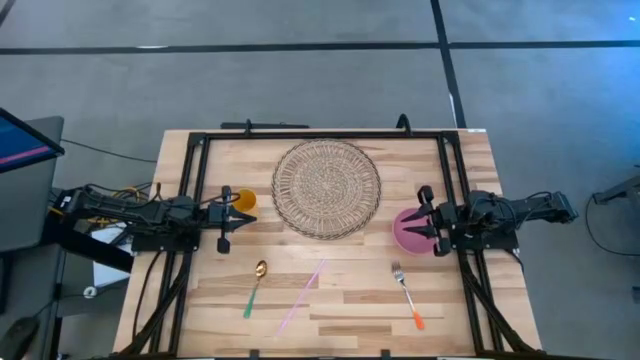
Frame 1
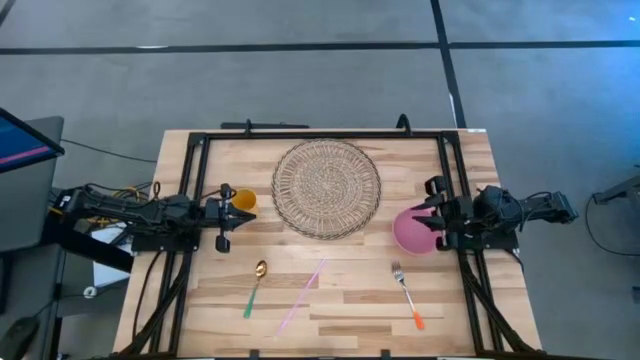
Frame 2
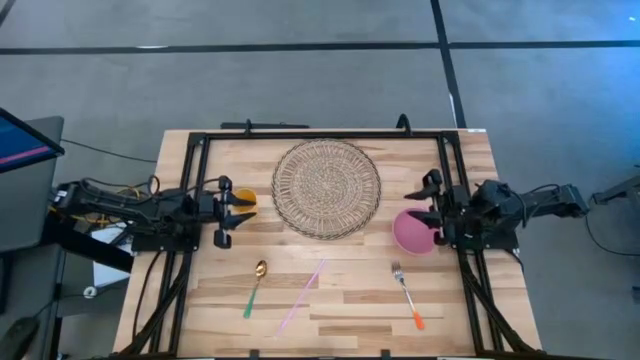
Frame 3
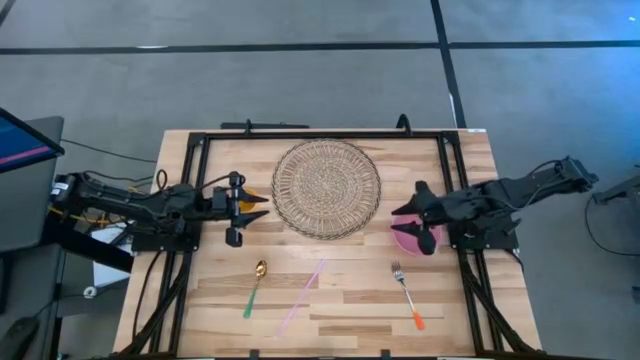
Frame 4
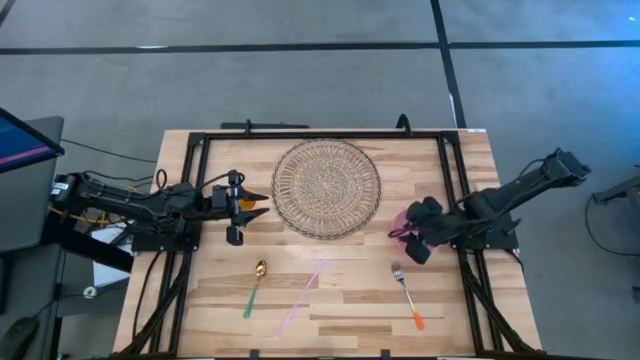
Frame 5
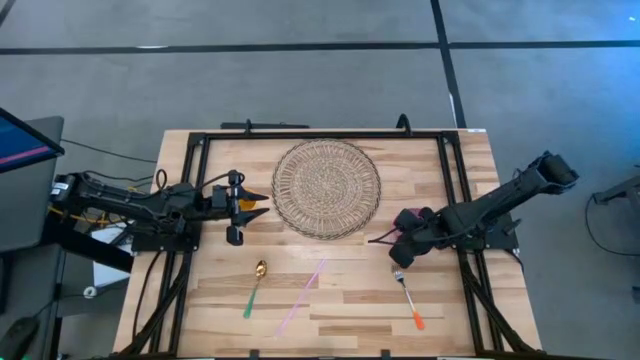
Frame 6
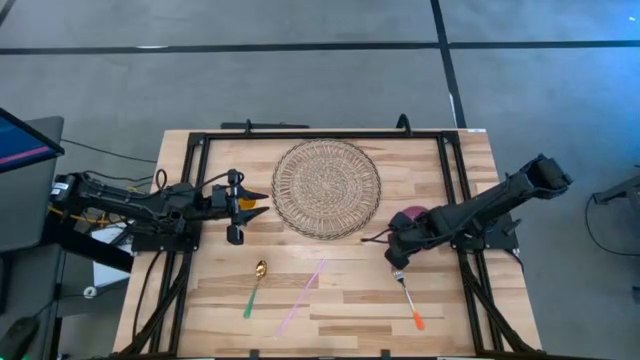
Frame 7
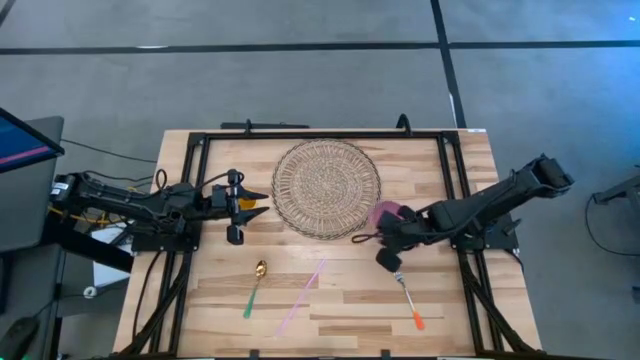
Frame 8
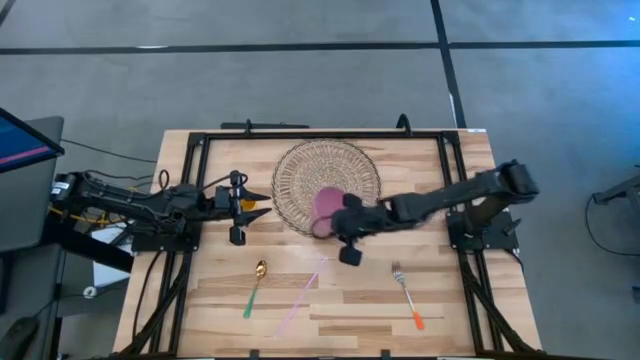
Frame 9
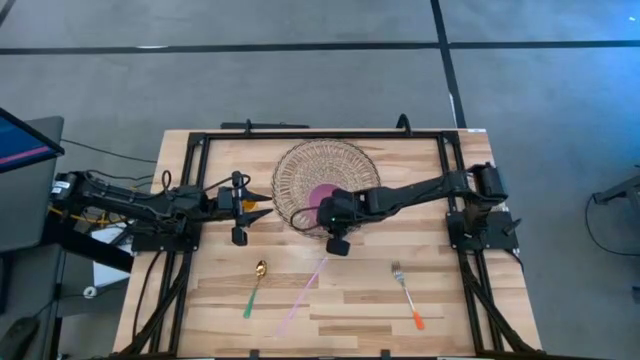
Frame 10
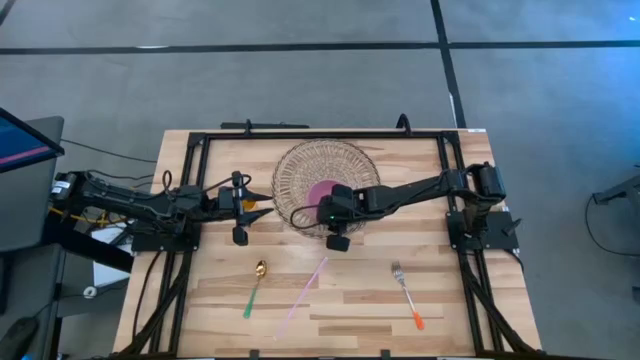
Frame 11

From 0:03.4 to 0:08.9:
Task: Pick & Place Utensil
Put the pink bowl on the brown table mat

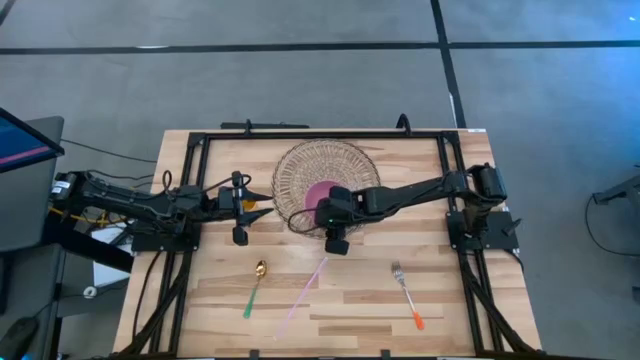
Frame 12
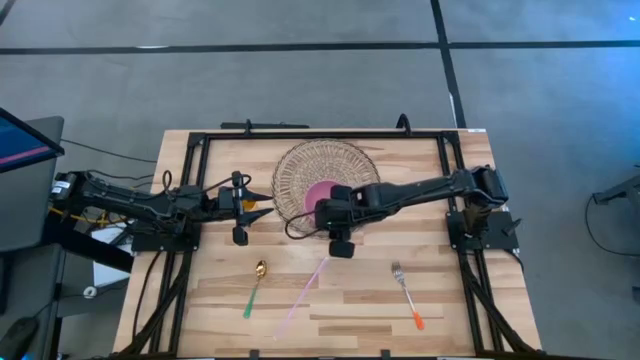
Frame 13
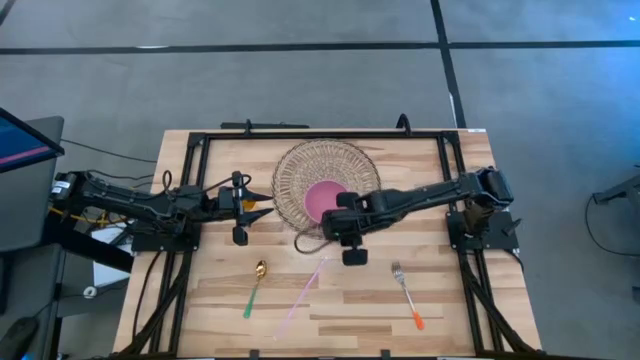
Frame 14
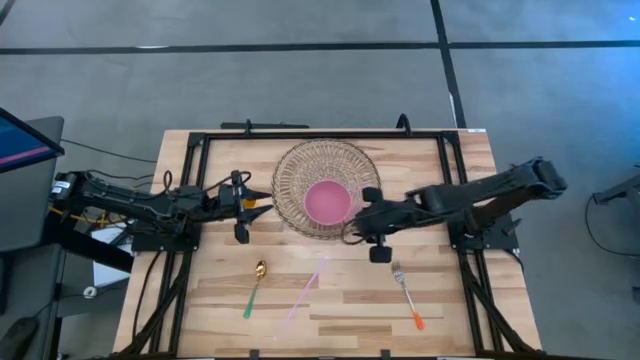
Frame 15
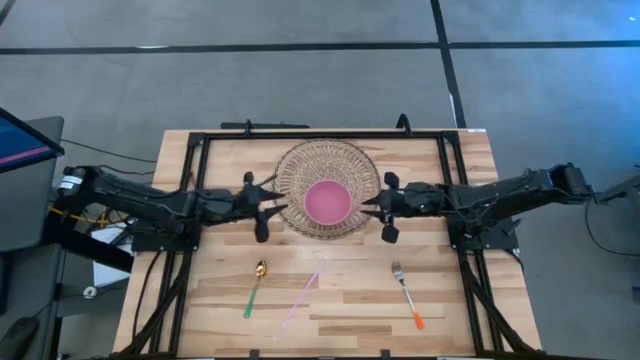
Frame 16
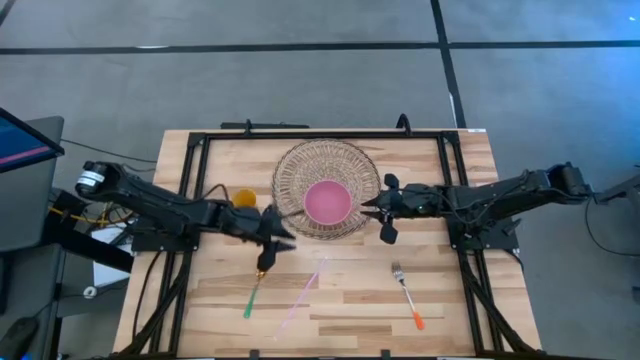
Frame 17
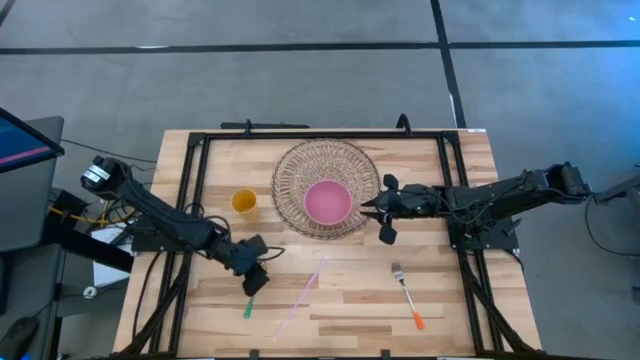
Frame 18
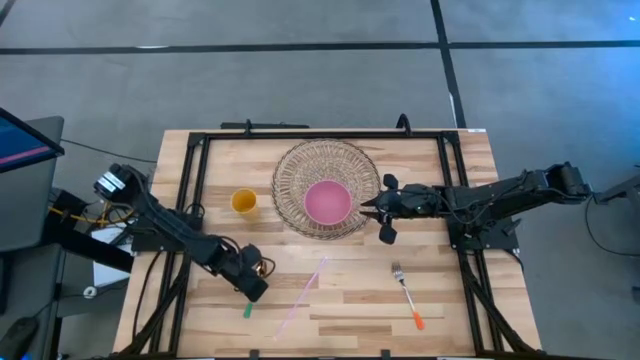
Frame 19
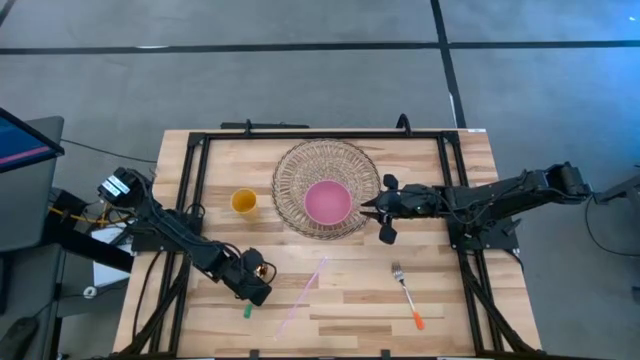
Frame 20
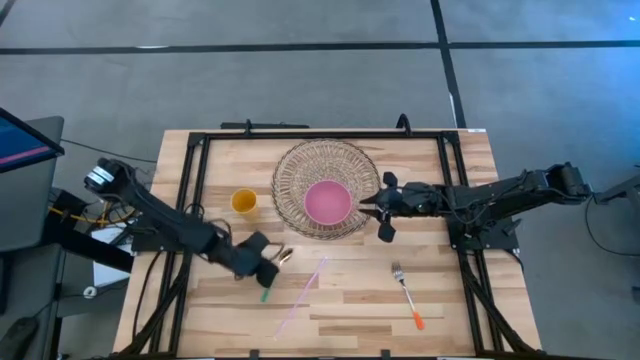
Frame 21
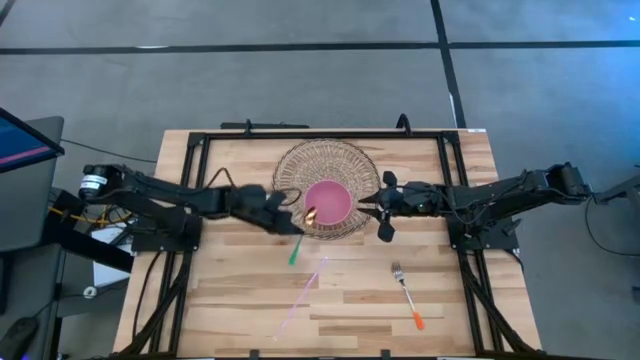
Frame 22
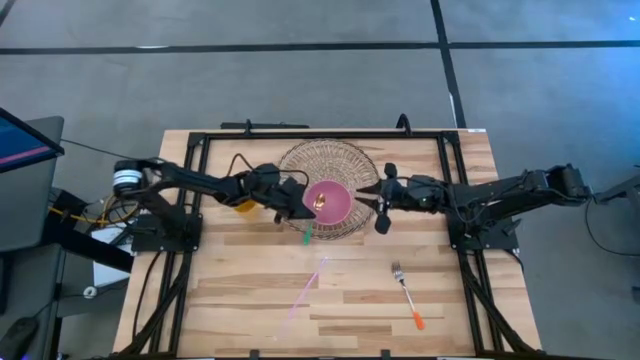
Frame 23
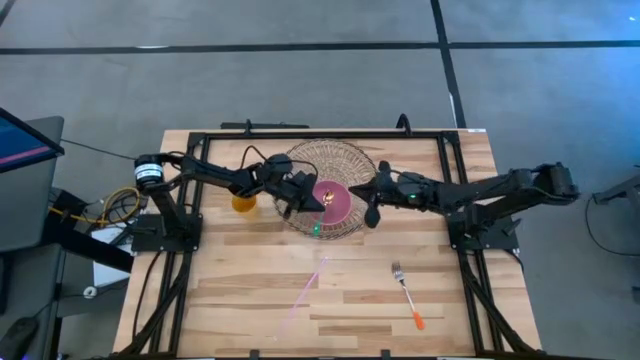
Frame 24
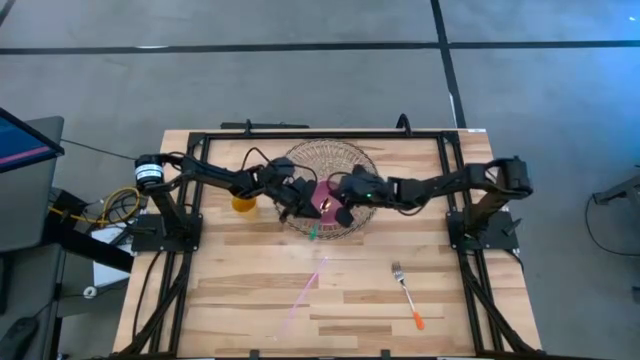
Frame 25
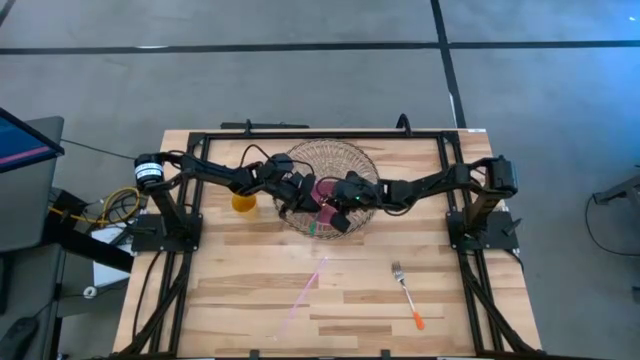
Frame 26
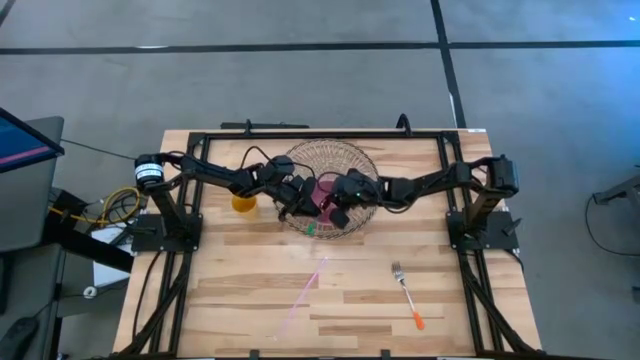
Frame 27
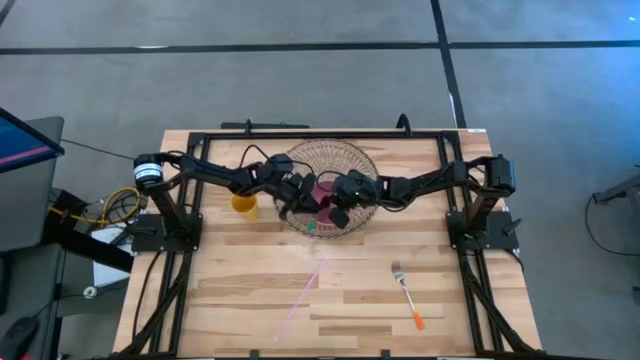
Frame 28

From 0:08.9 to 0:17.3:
Put the green spoon into the pink bowl

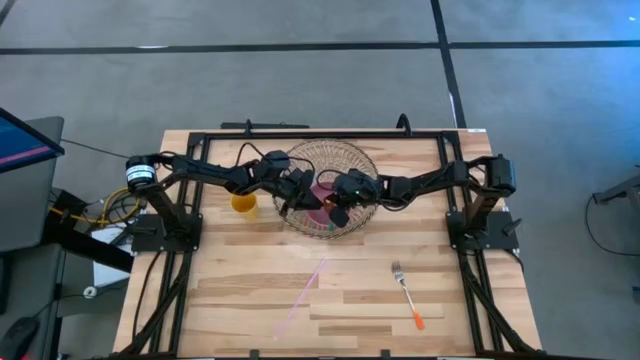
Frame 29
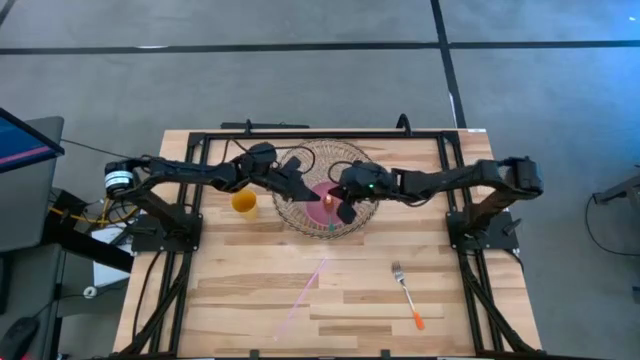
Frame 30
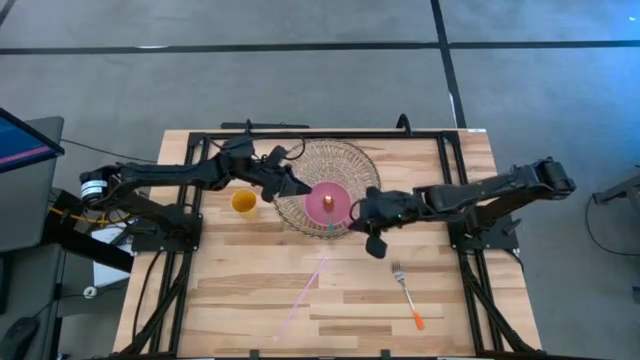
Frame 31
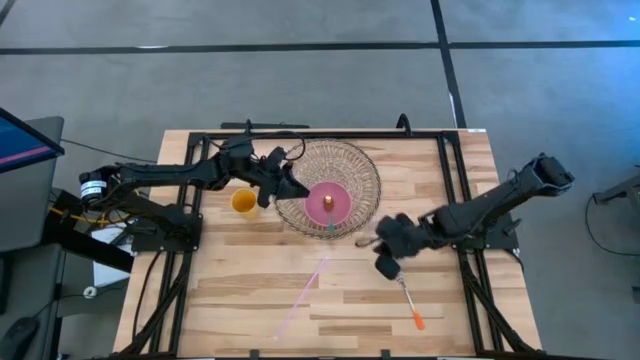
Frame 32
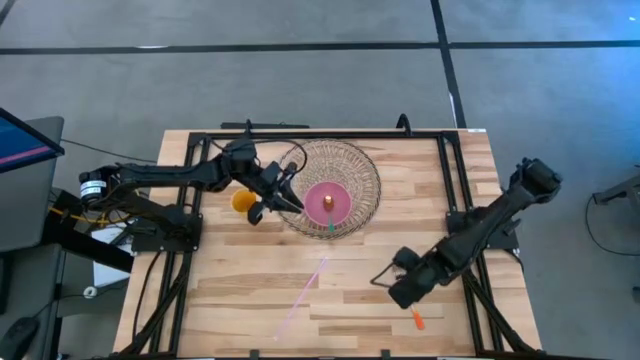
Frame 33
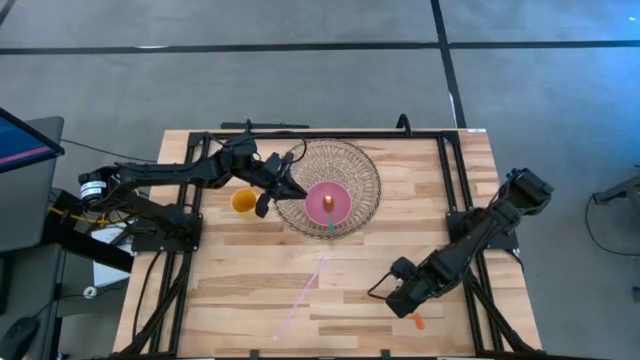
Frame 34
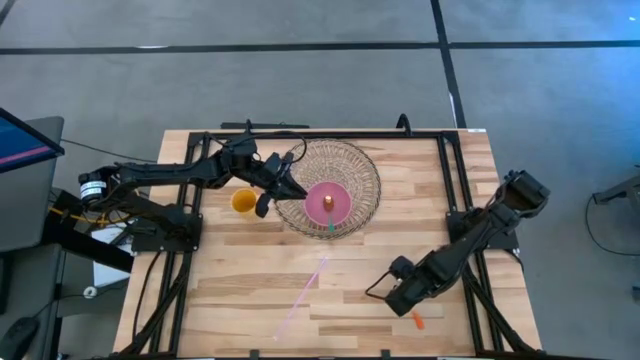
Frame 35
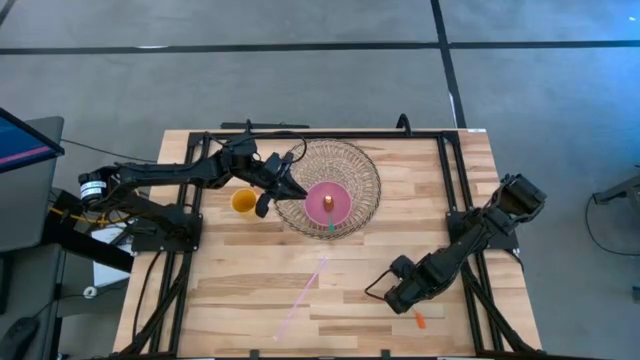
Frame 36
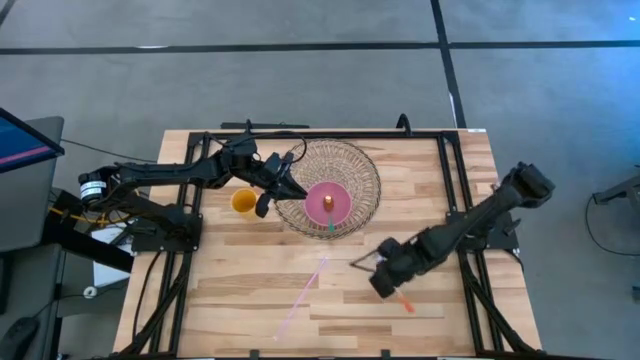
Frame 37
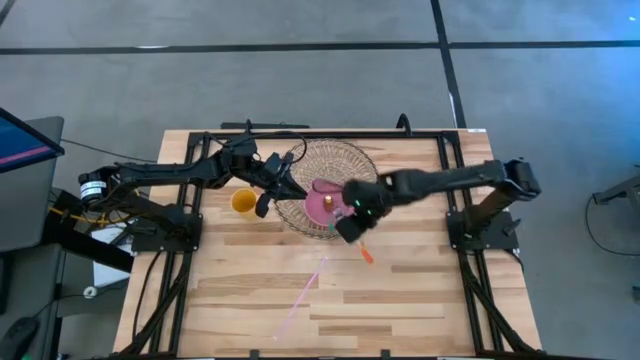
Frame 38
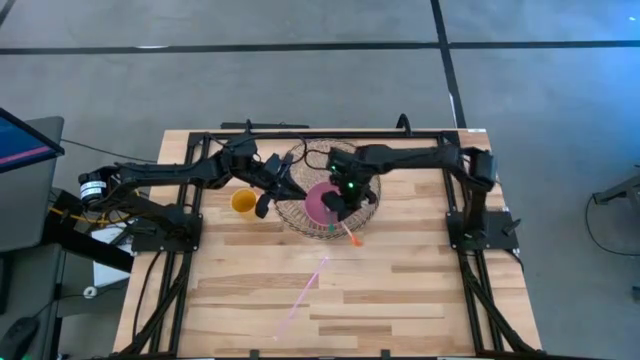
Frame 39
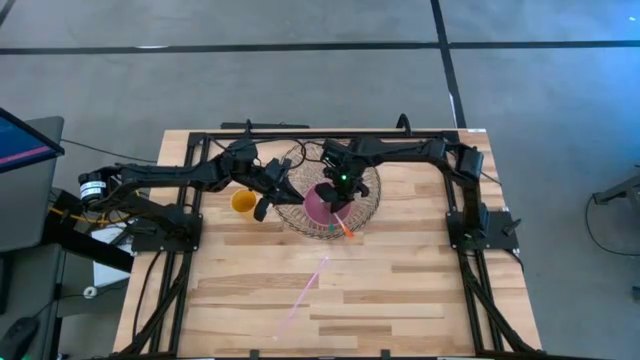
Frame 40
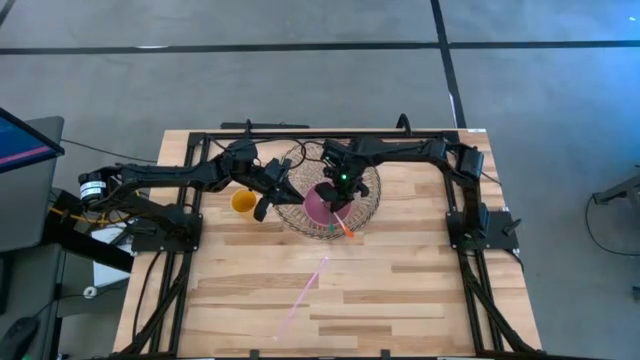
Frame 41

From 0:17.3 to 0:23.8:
Put the orange fork into the pink bowl
